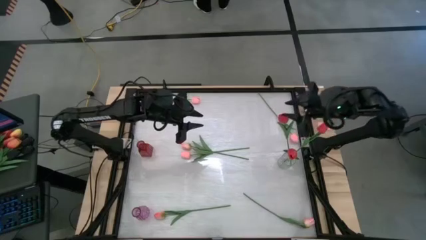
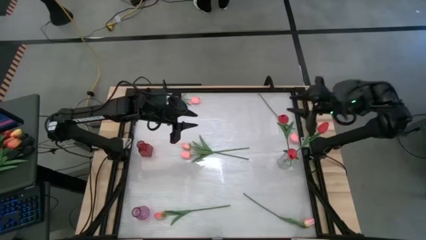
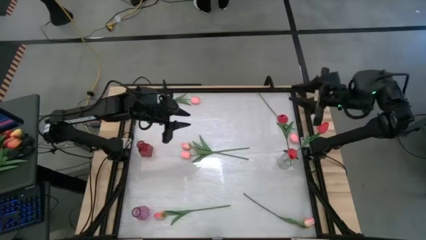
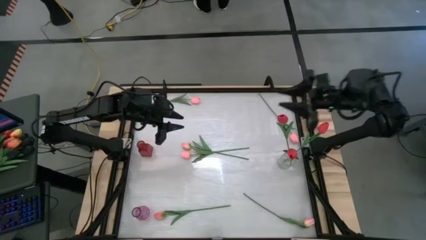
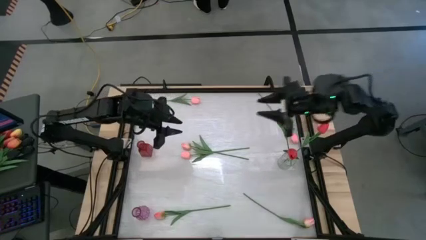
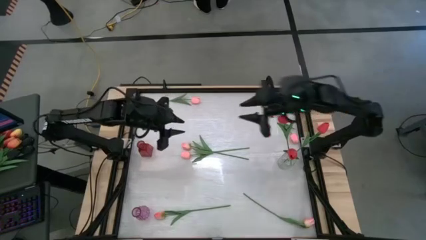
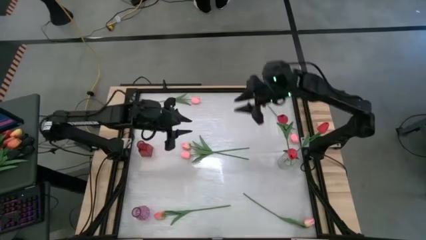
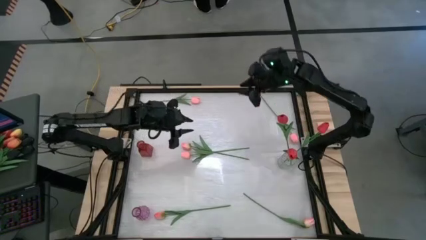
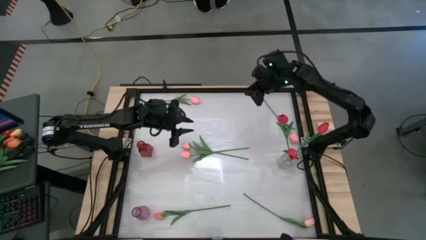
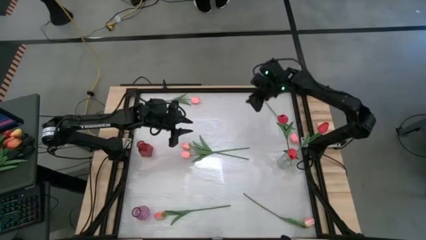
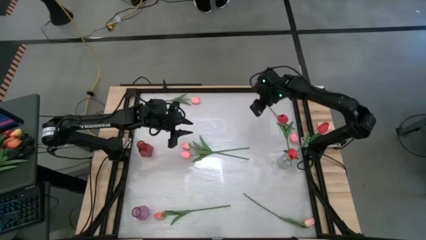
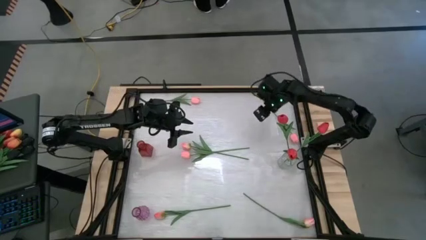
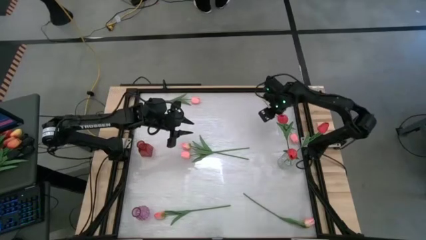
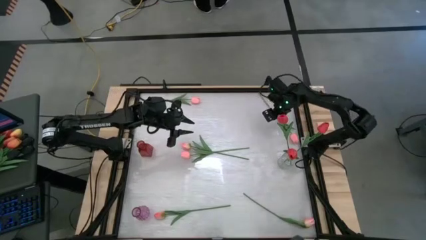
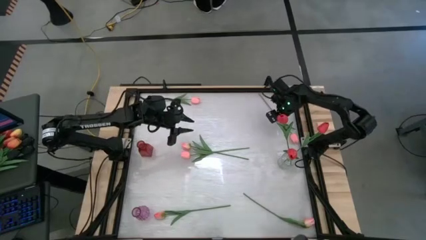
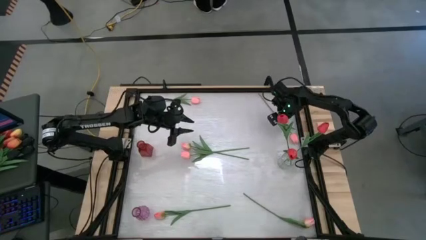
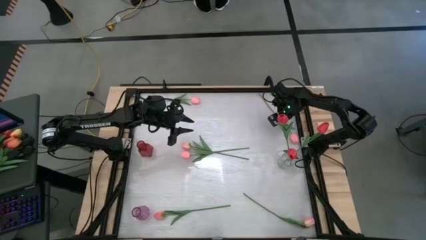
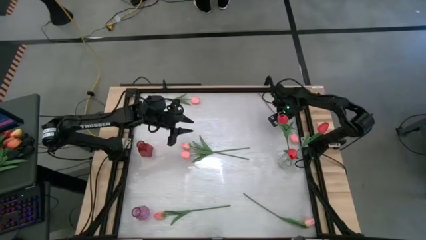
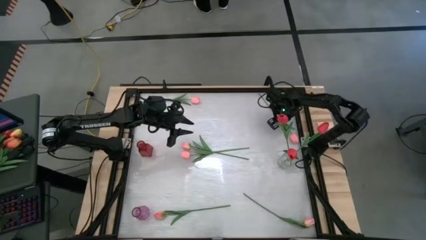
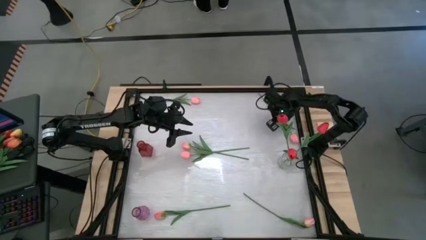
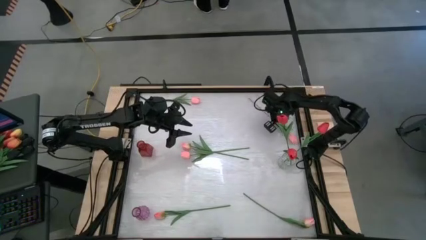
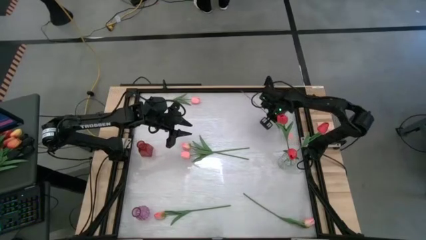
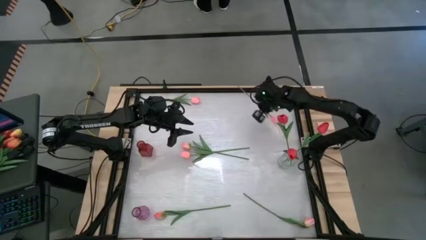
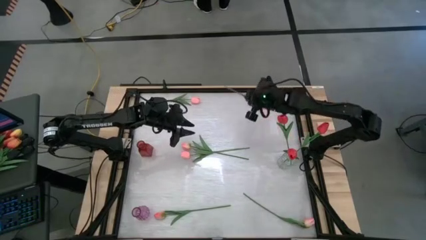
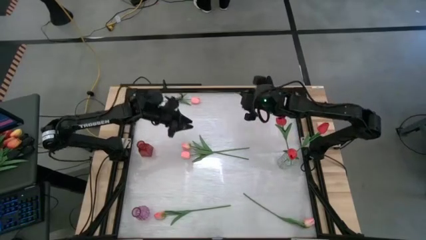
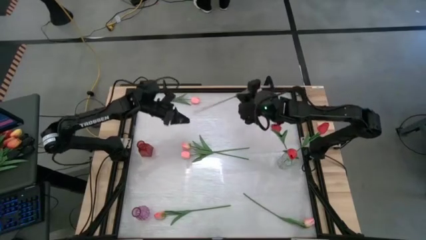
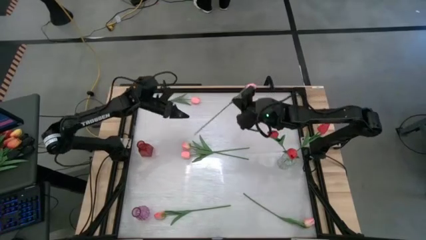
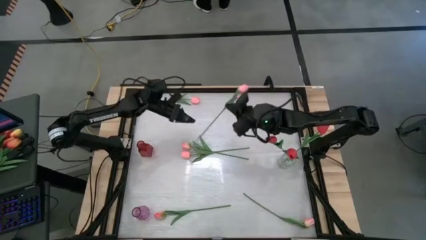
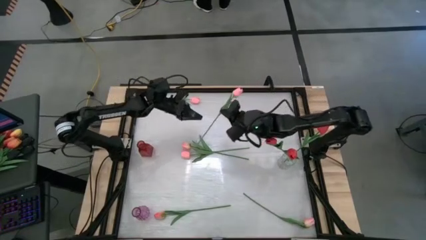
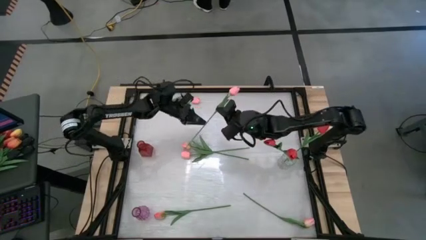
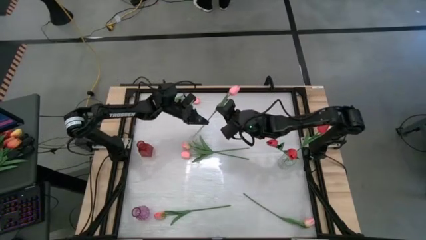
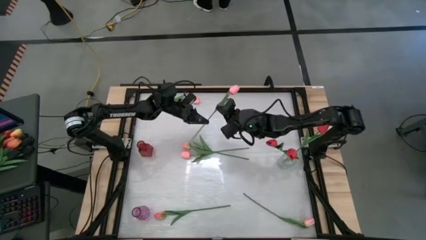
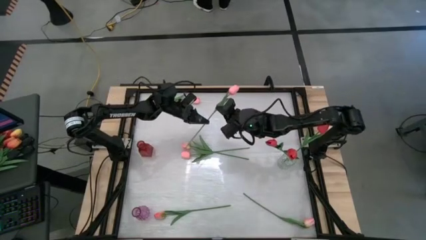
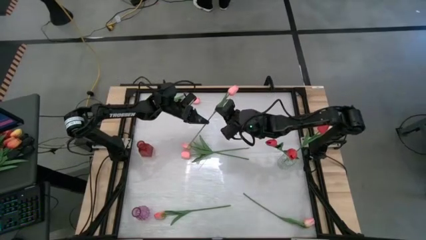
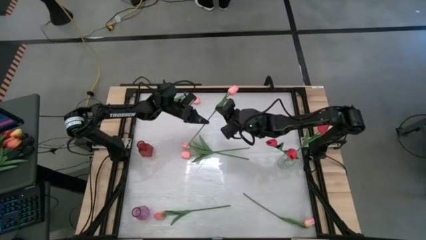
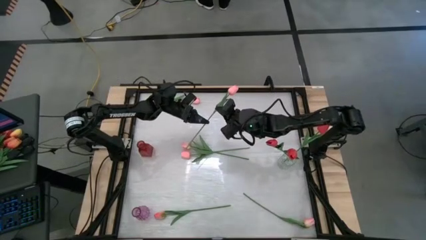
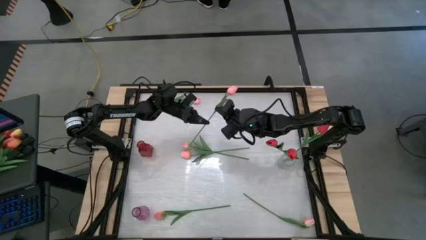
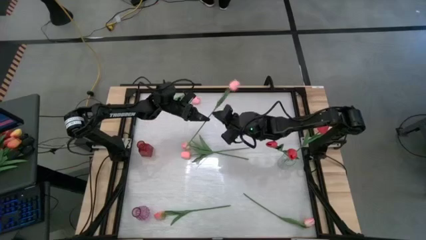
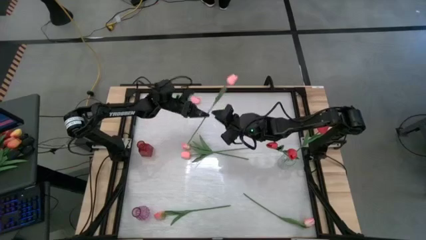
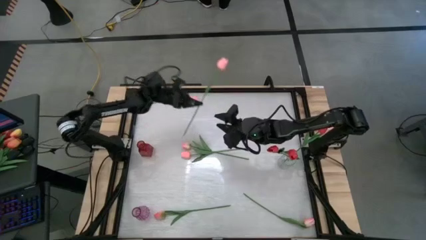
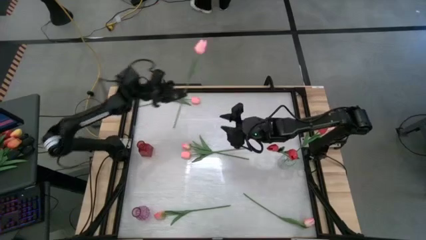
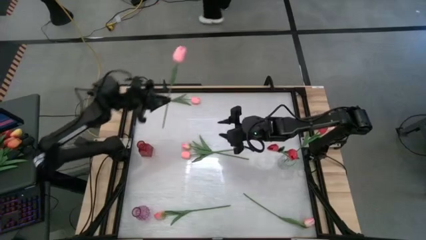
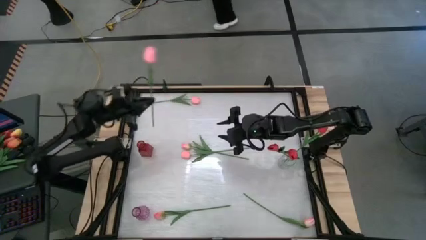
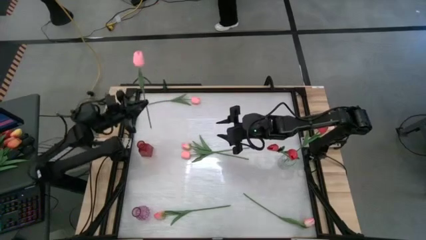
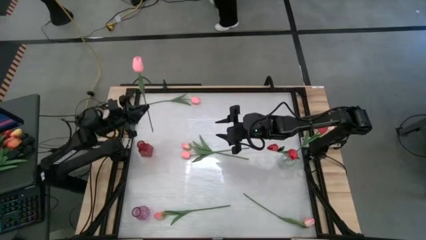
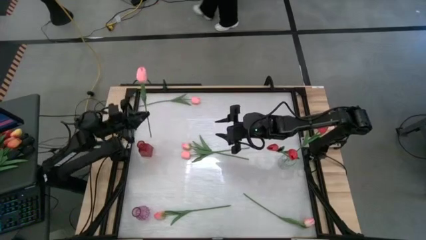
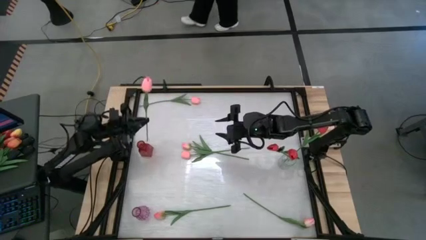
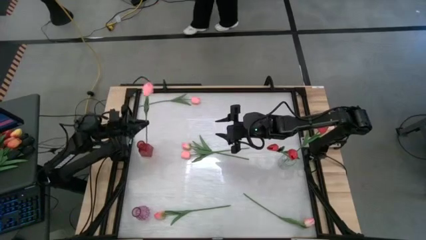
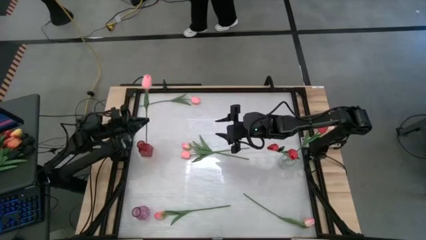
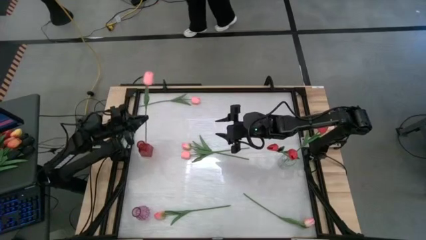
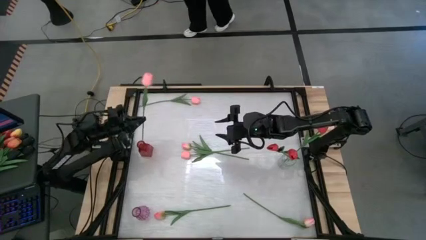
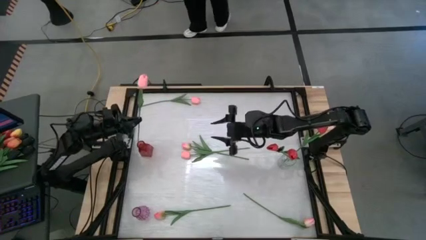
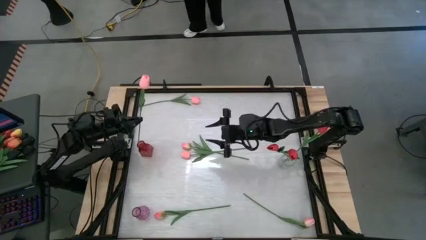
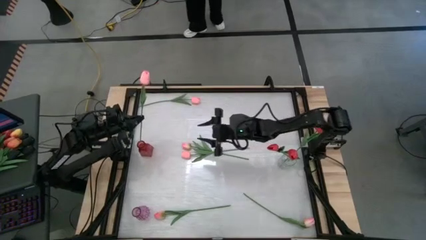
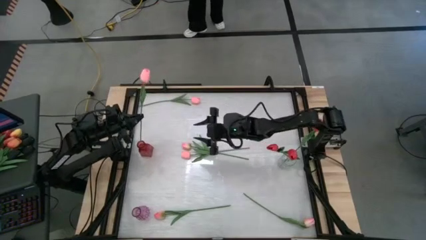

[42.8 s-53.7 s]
Task: Sort flowers into vase by color
Put the top right pink flower into the red flower vase
